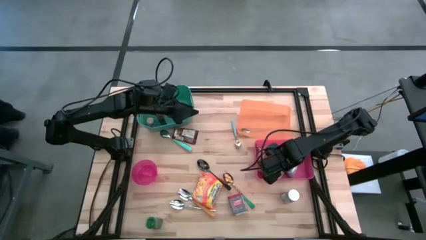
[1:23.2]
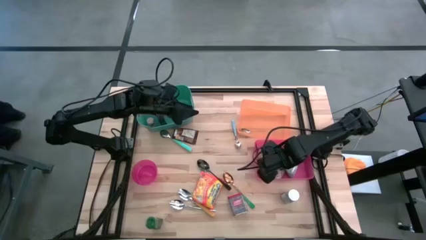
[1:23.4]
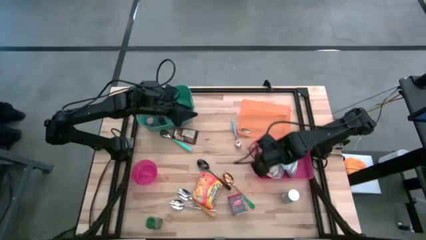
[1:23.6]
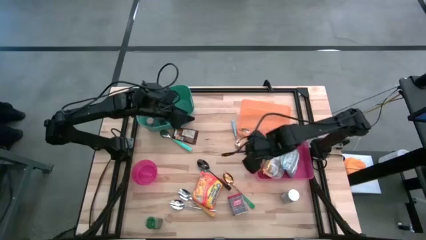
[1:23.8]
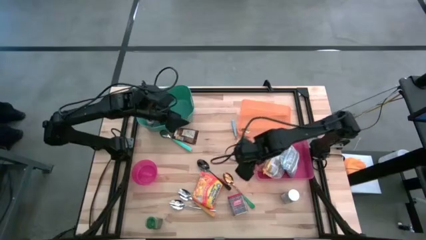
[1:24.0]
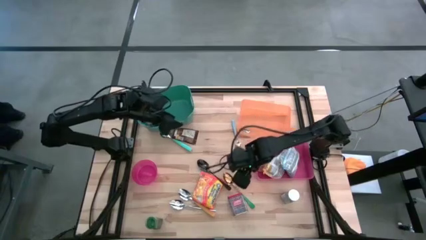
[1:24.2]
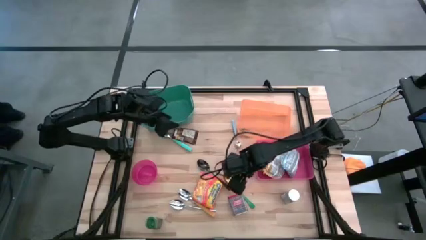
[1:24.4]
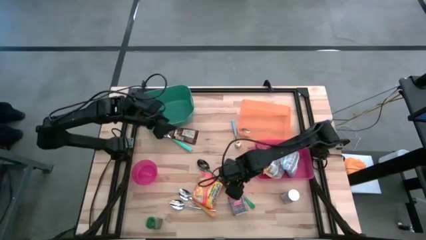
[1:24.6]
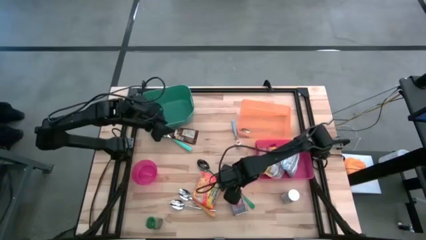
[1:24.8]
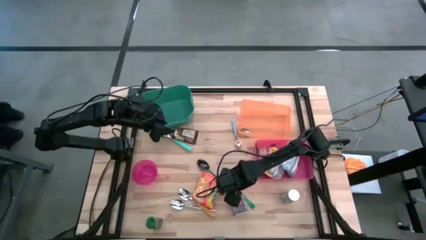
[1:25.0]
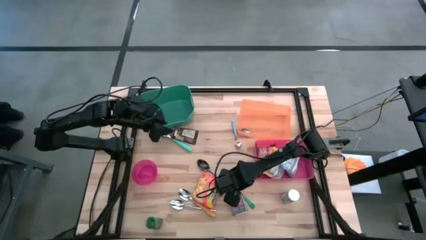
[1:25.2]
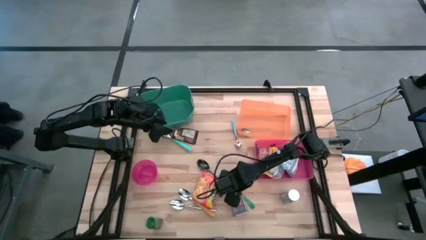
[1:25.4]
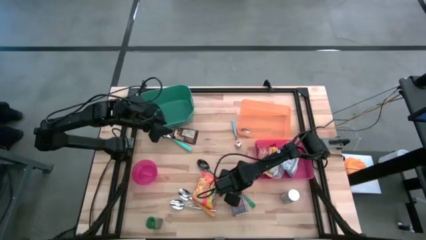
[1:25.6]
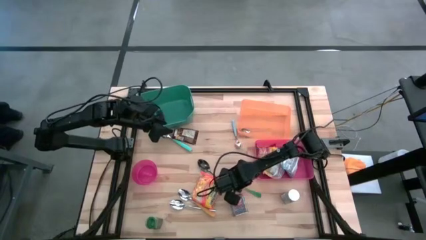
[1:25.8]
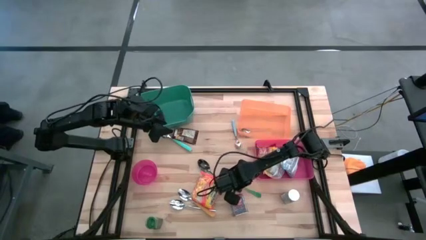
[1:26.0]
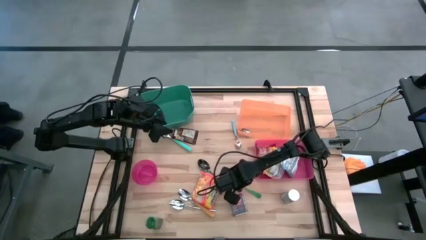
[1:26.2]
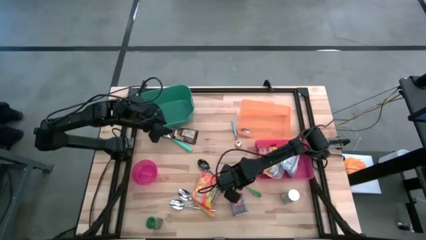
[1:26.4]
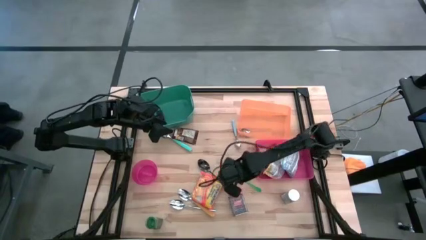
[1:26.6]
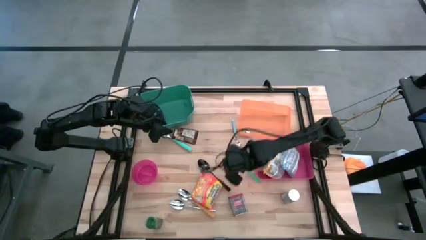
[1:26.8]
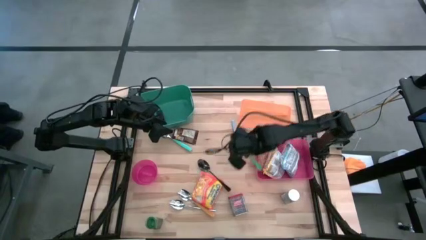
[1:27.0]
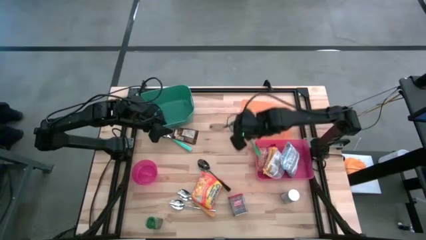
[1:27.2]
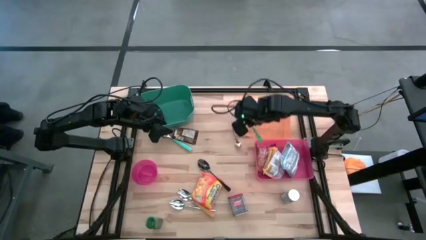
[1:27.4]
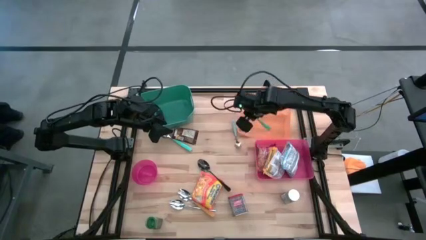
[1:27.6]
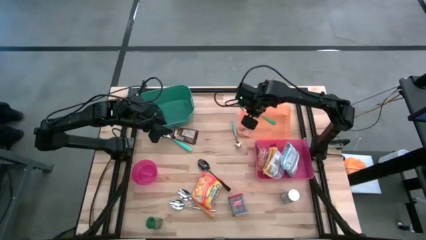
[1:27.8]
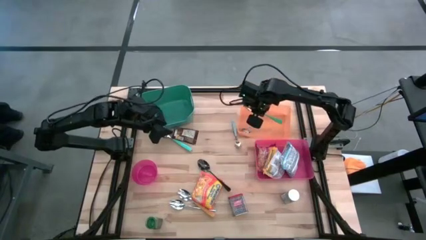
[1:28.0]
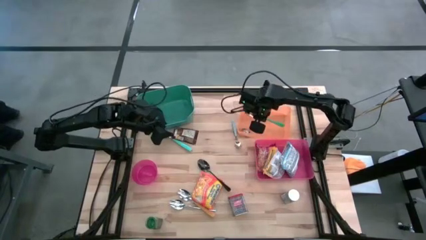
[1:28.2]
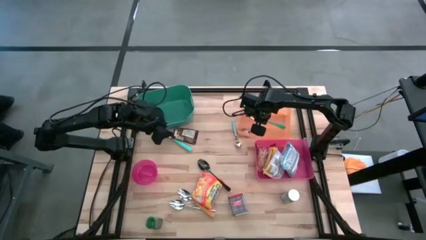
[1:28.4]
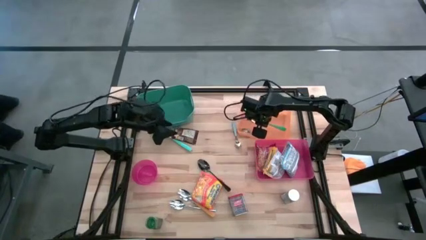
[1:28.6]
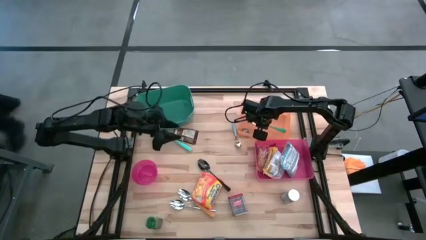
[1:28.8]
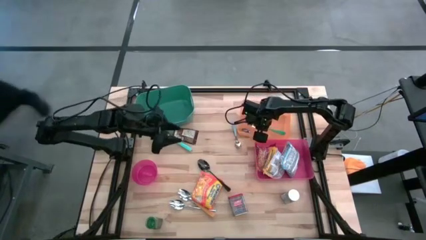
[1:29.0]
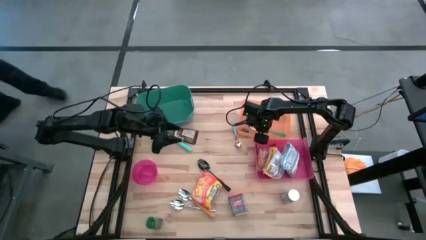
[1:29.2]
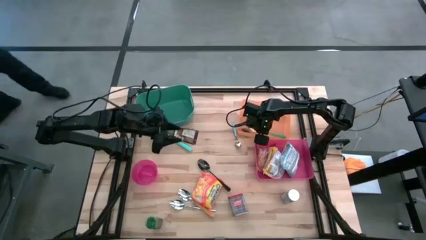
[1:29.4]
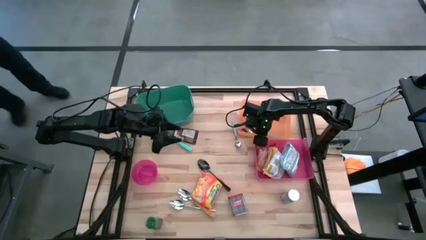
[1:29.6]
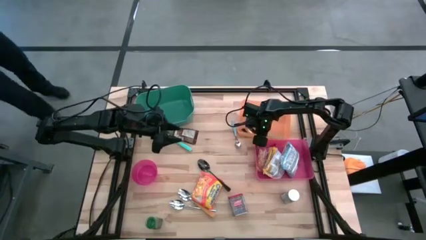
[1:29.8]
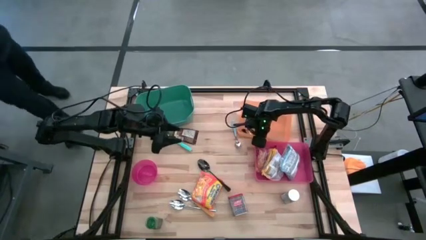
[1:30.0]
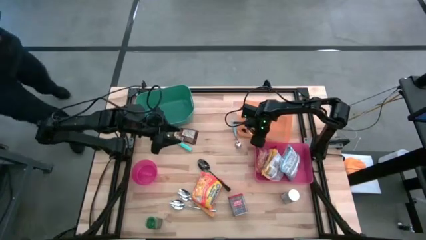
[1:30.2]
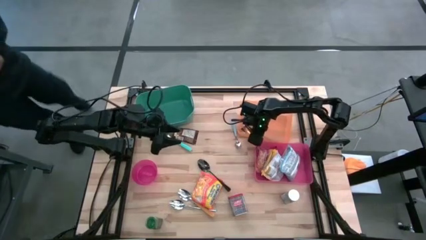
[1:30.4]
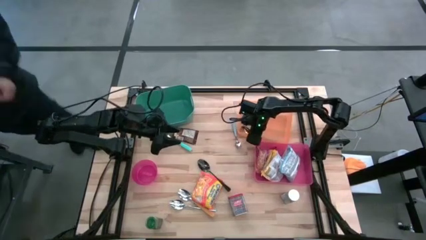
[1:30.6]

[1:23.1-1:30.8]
Put the green spoon into the orange bin

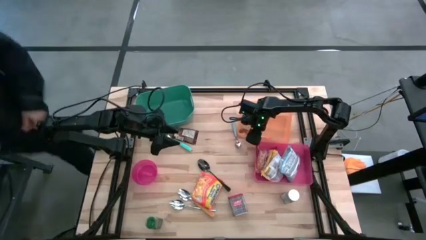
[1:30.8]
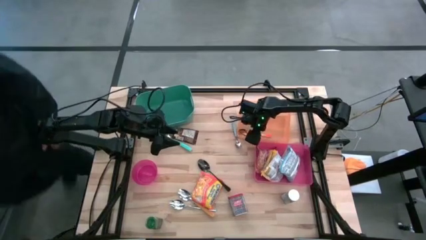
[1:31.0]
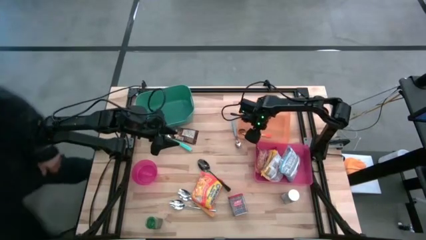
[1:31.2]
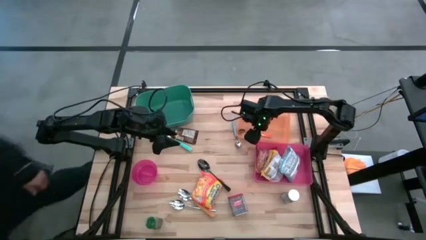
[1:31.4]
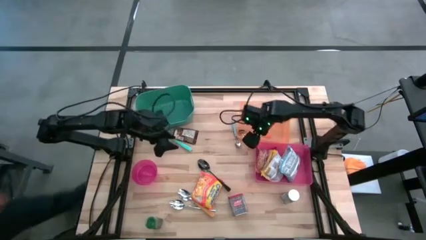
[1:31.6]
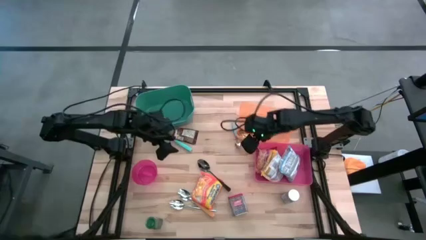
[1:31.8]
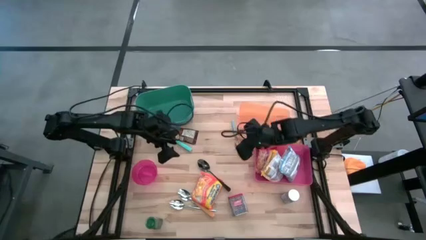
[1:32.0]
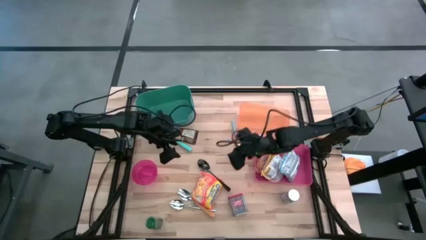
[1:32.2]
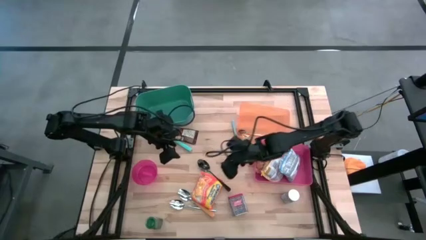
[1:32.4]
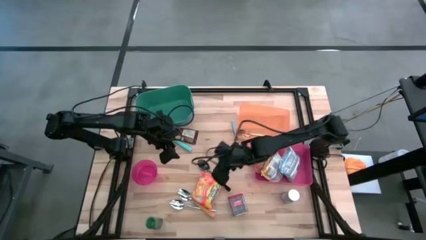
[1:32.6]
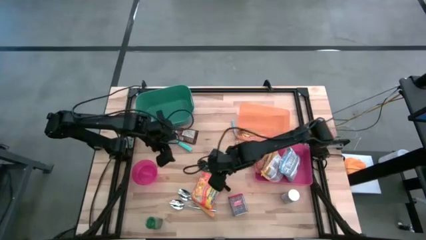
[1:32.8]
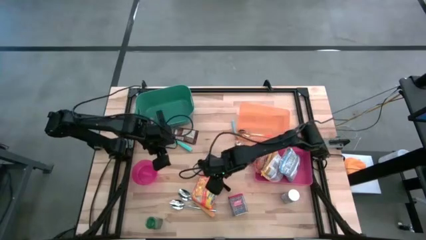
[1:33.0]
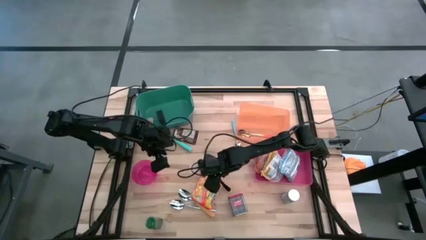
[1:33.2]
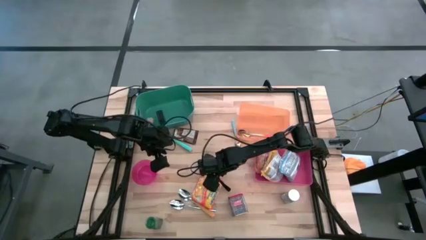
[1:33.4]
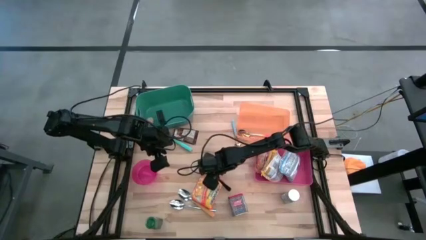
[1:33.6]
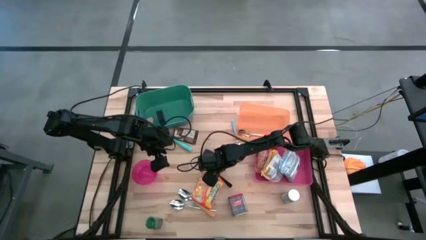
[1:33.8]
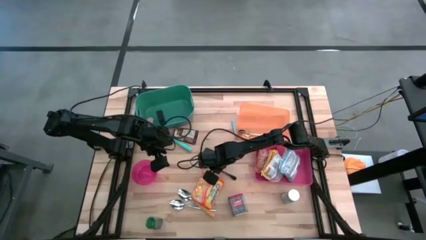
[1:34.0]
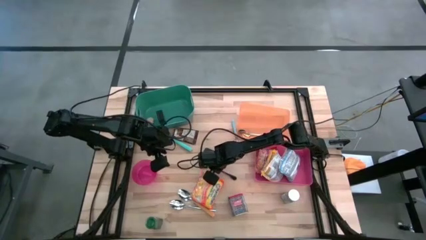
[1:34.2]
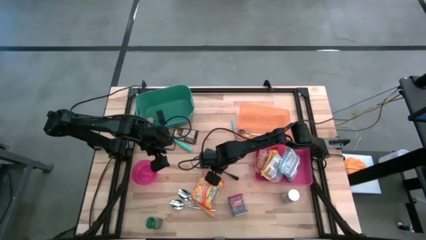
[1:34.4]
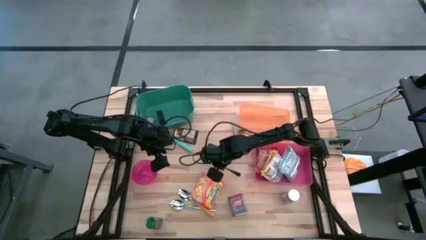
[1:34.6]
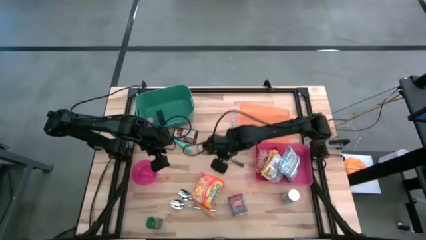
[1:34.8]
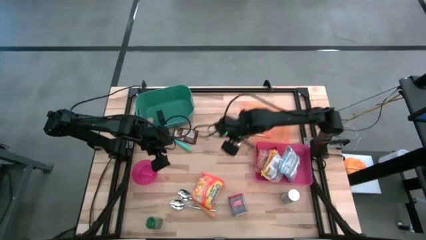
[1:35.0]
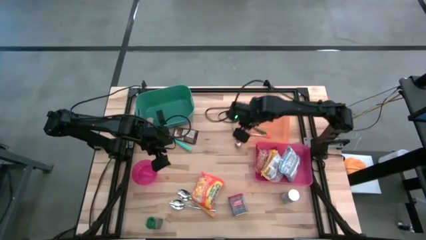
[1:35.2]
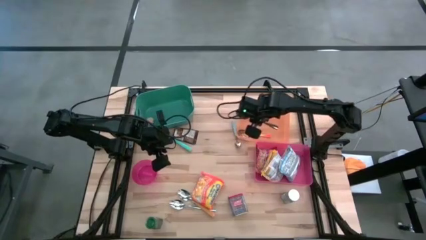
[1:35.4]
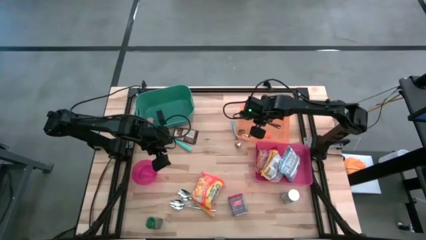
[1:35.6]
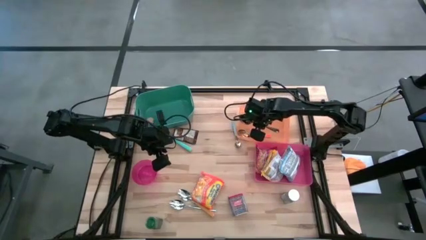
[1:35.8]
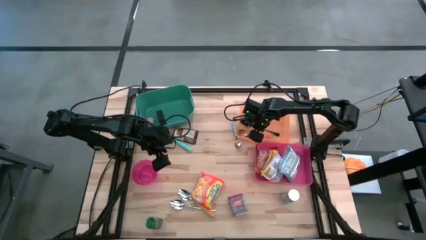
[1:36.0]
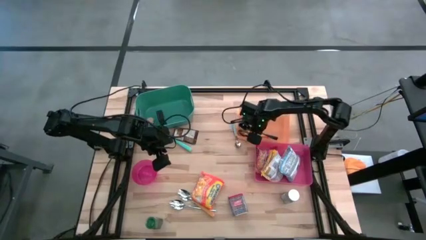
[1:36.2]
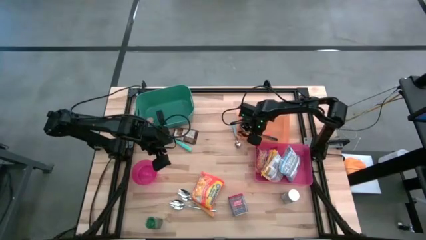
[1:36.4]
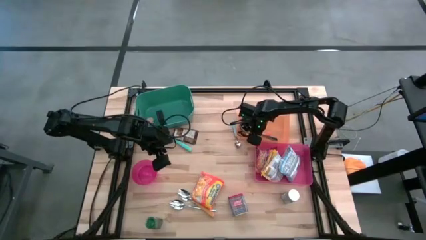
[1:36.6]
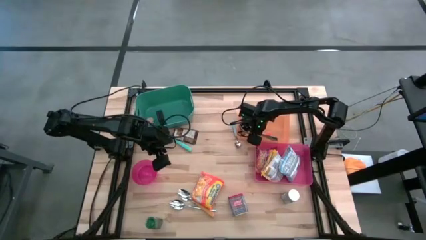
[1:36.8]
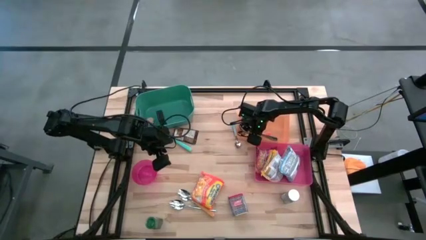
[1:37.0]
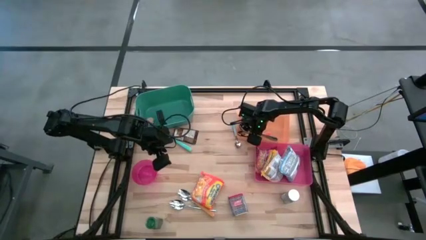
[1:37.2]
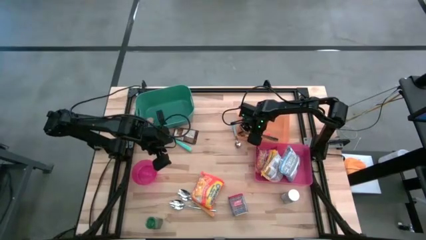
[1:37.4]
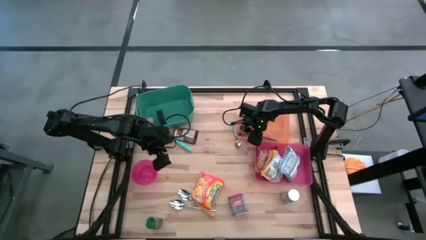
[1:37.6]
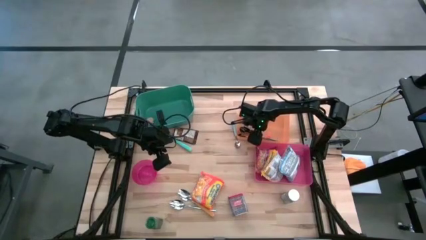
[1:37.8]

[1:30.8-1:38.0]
Put the black spoon into the orange bin
